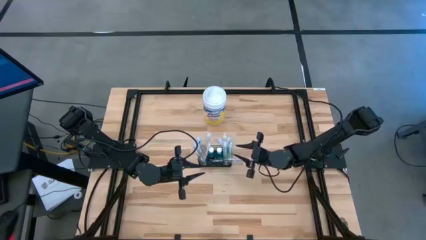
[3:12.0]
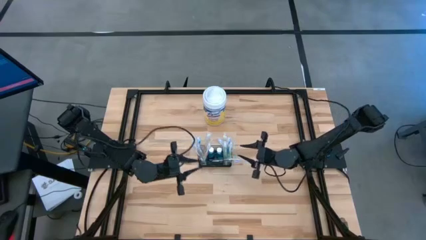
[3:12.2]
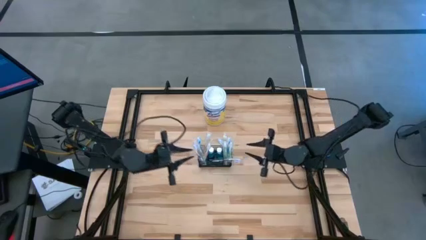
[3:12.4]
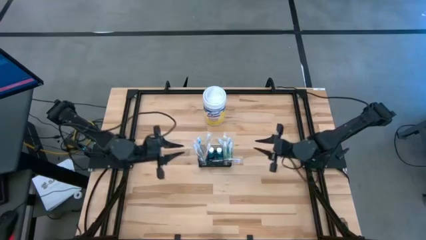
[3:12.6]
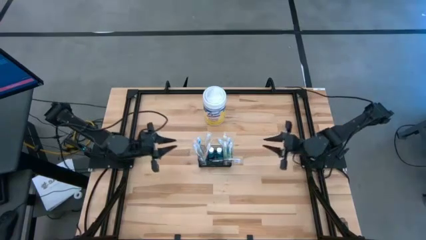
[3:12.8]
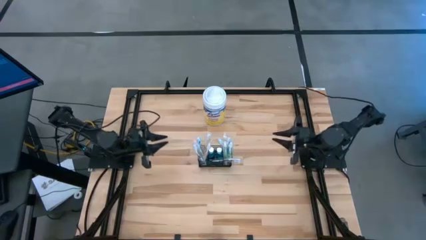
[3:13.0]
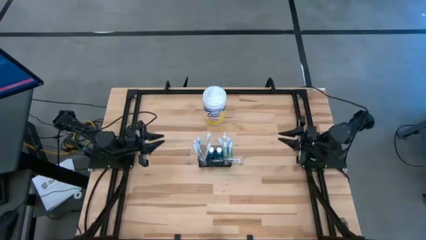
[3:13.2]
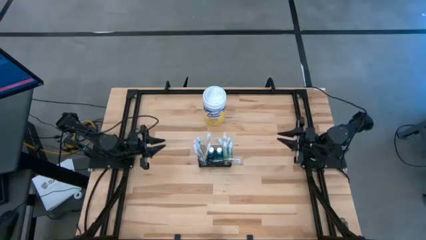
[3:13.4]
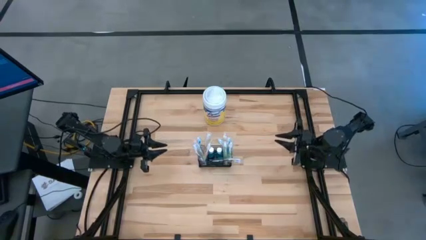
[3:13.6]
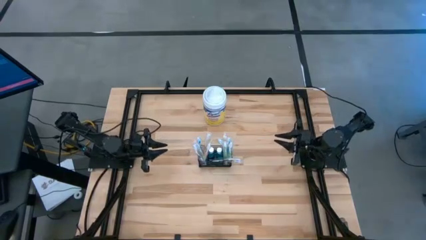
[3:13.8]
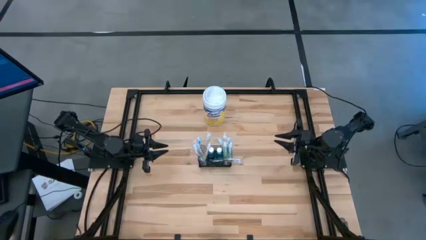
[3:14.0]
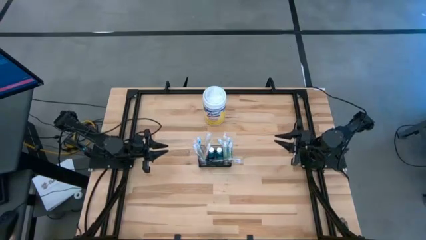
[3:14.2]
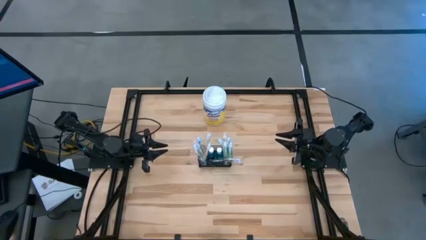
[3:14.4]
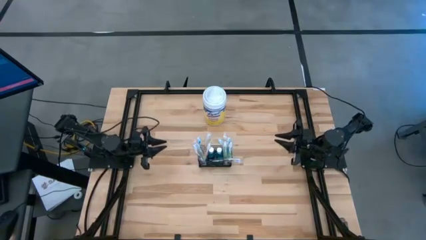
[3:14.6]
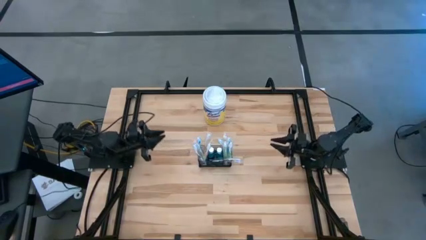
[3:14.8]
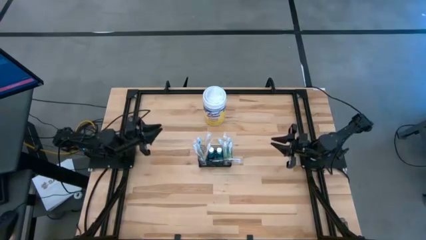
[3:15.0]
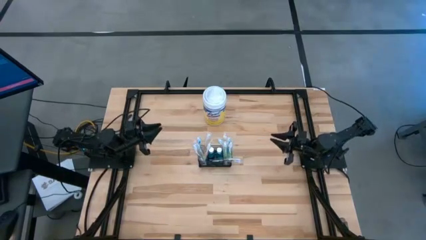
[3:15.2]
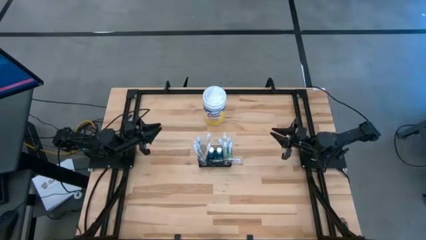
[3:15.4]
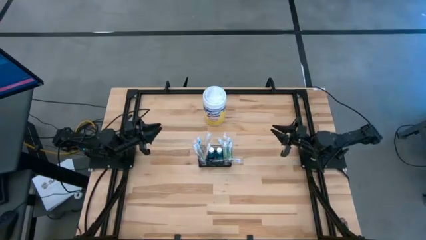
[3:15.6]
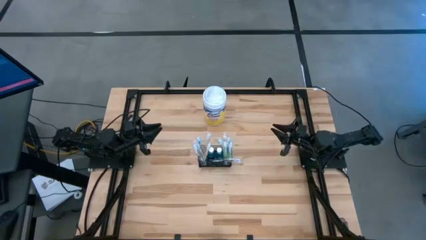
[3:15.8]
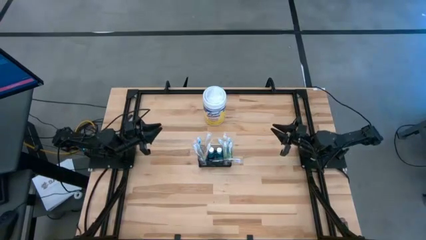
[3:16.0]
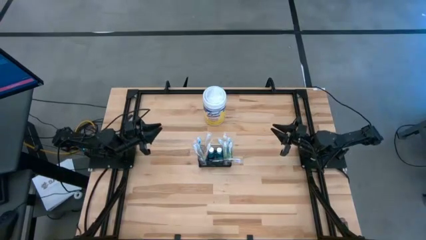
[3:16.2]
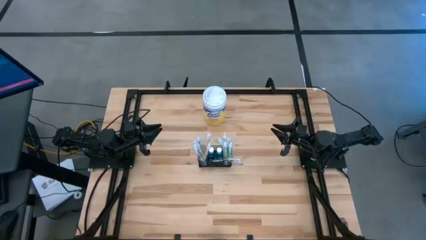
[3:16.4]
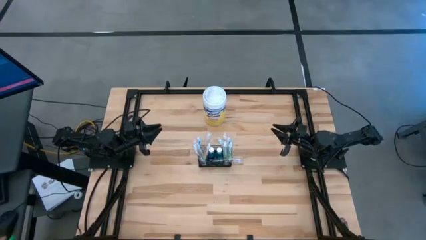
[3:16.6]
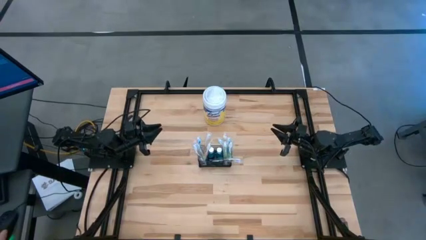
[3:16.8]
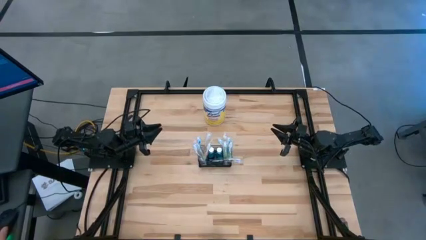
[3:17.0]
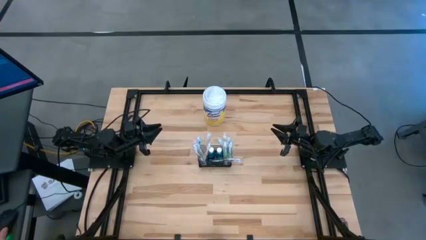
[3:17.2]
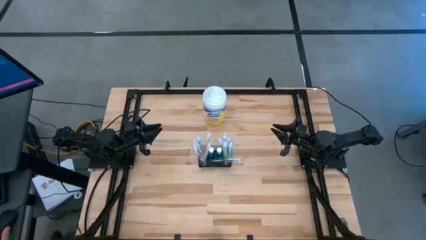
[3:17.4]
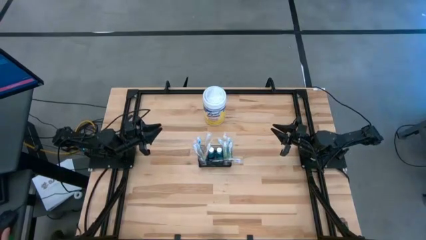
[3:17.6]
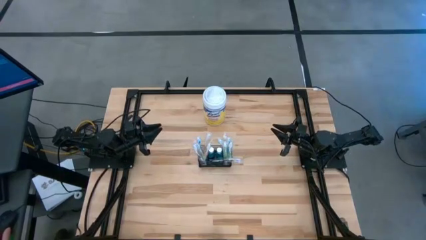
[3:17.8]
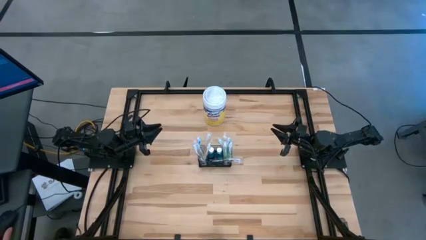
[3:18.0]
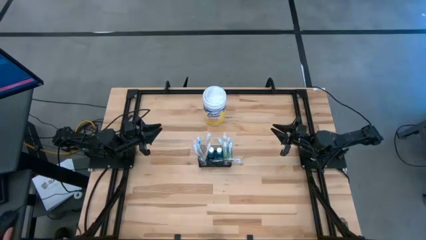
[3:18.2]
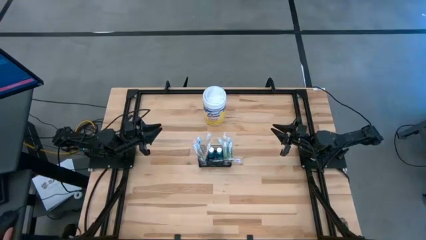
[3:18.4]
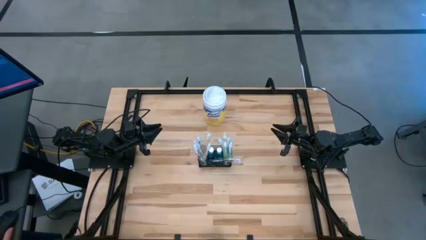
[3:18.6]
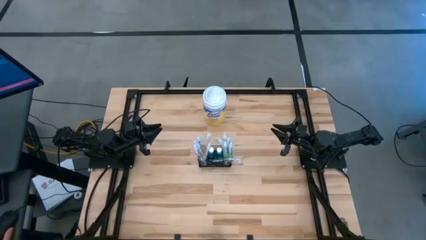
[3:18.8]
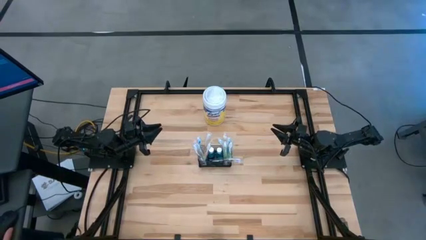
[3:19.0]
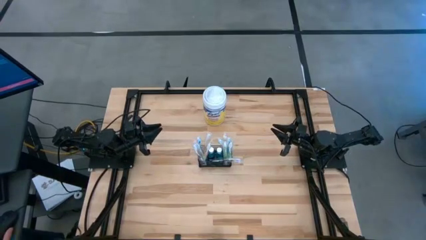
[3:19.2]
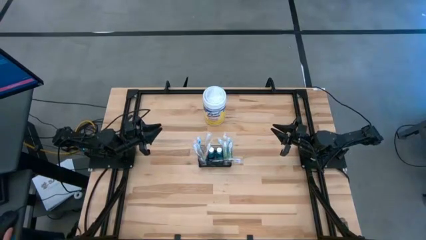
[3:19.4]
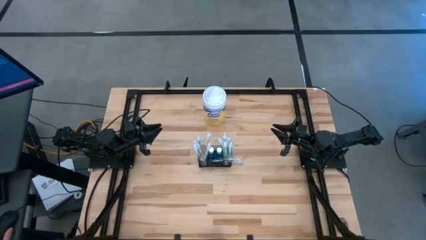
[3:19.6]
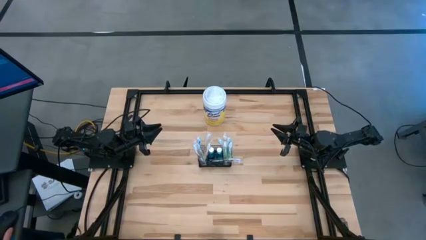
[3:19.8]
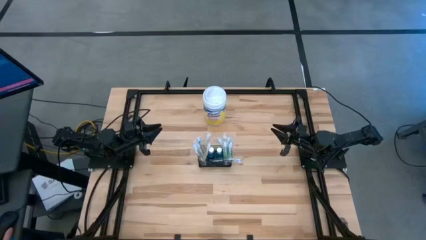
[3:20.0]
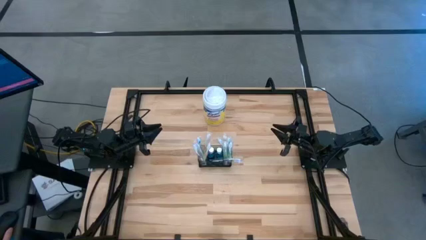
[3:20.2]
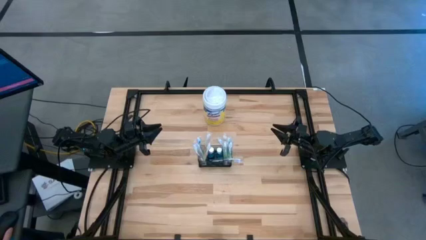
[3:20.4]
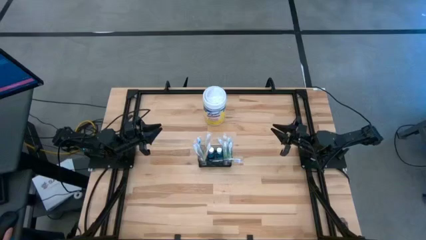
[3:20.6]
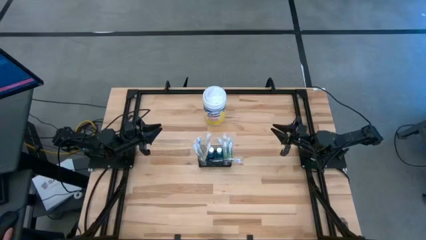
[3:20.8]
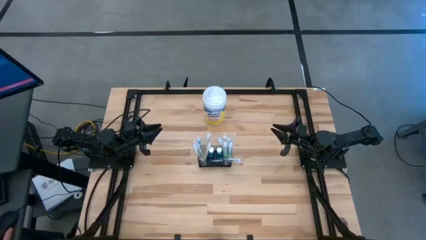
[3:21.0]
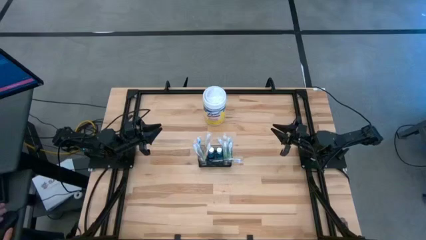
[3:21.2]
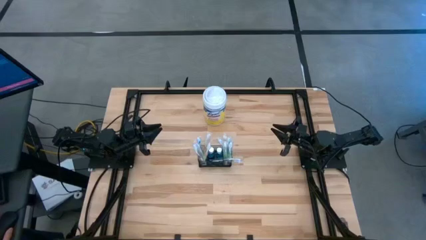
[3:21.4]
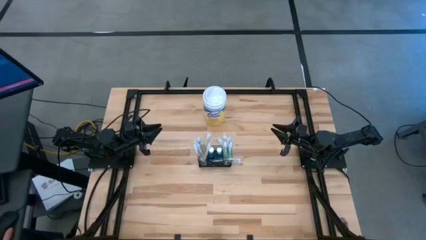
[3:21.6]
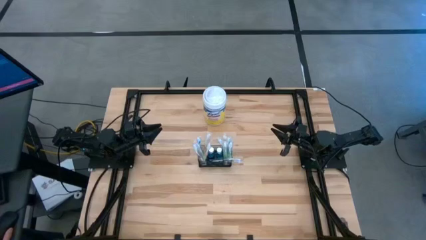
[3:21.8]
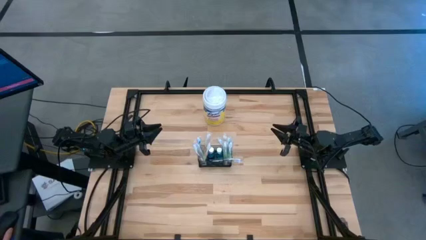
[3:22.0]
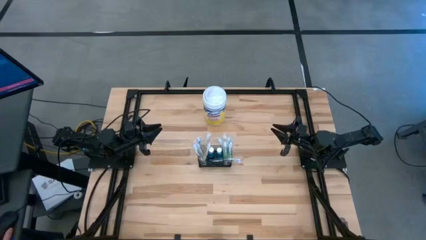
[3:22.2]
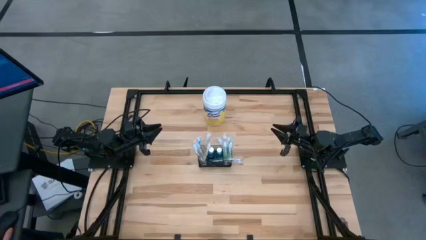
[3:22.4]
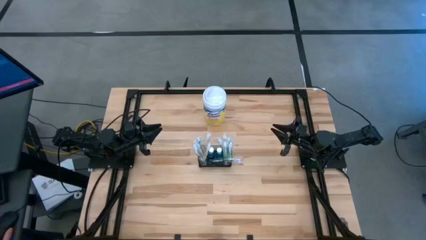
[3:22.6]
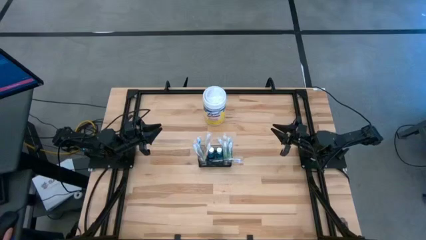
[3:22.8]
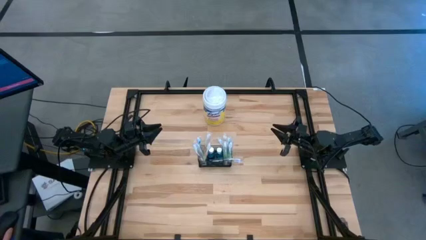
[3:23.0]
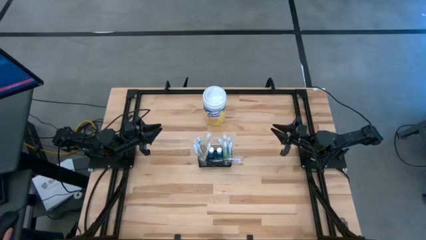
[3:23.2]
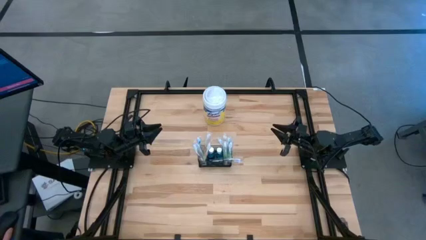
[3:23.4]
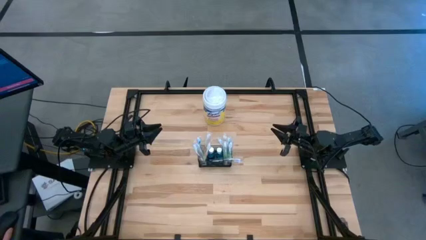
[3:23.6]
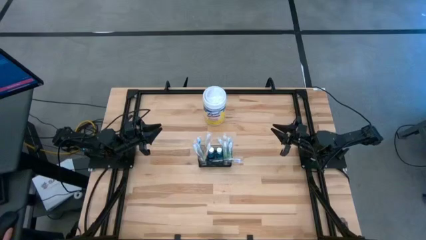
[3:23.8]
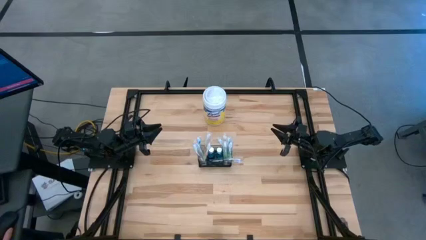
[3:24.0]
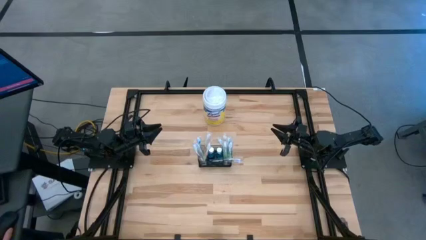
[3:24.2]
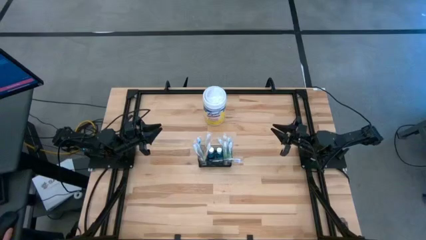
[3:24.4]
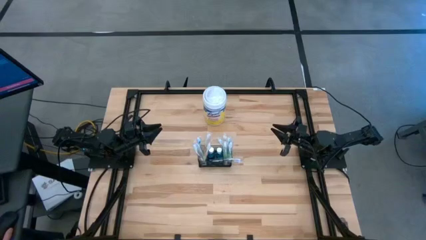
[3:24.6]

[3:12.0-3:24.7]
Task: Pick & Place toothbrushing station
Return to Home Position

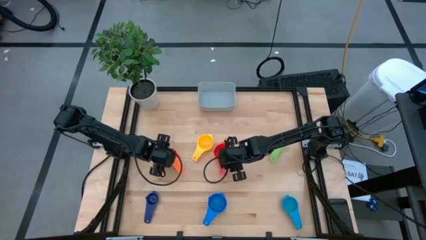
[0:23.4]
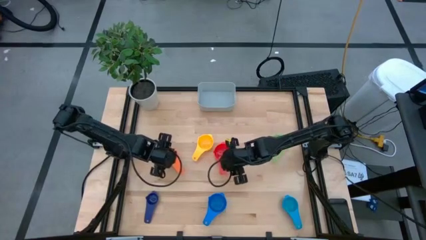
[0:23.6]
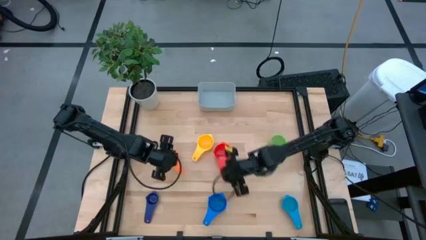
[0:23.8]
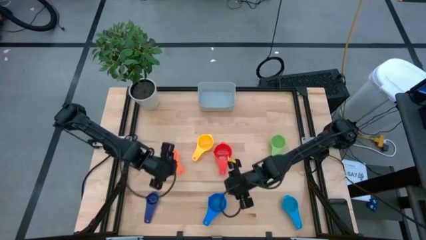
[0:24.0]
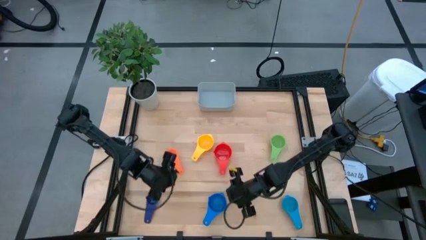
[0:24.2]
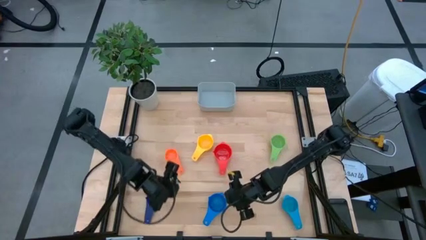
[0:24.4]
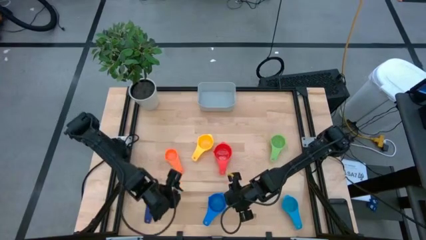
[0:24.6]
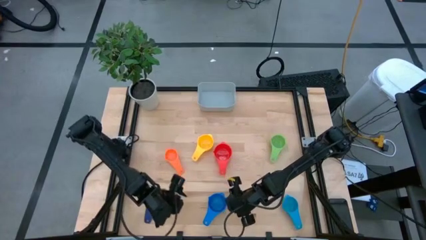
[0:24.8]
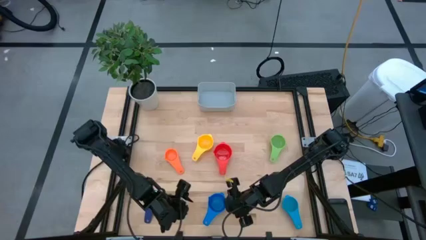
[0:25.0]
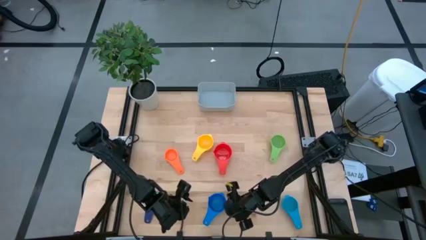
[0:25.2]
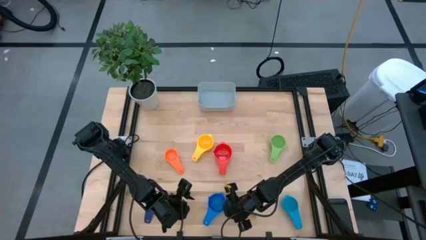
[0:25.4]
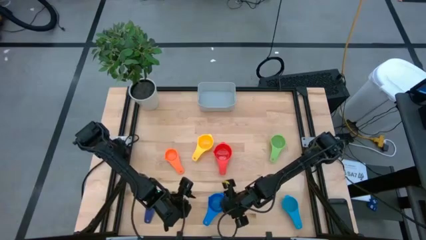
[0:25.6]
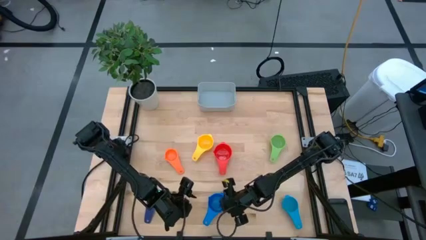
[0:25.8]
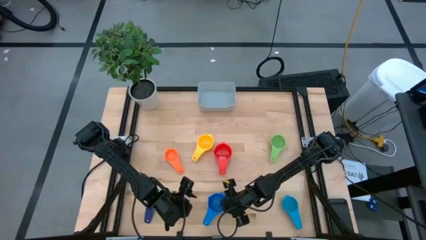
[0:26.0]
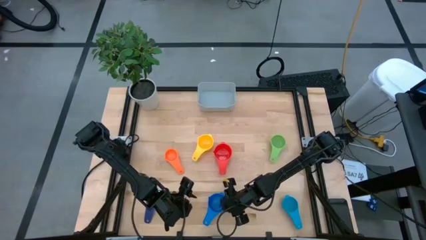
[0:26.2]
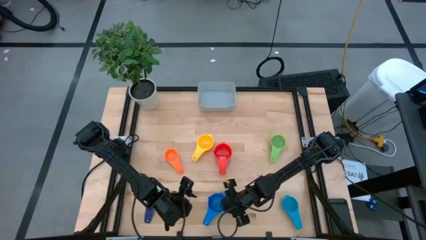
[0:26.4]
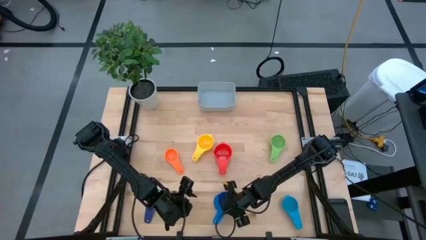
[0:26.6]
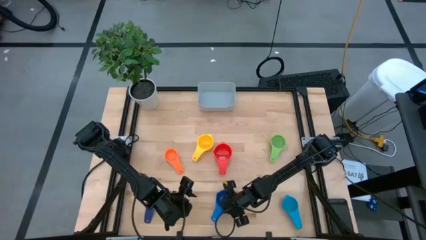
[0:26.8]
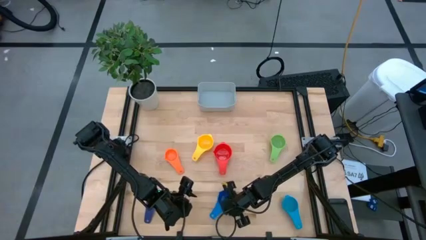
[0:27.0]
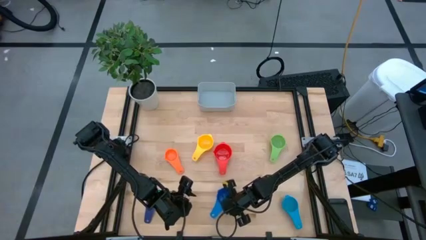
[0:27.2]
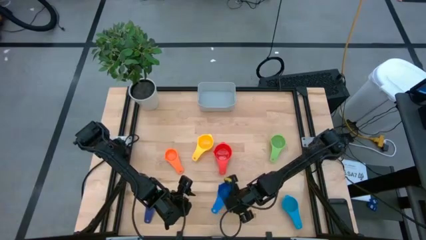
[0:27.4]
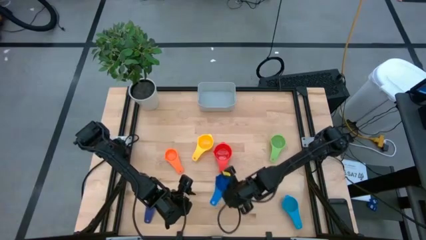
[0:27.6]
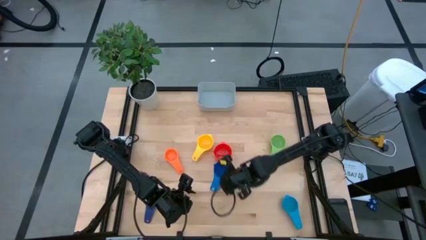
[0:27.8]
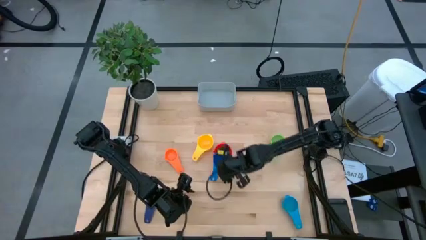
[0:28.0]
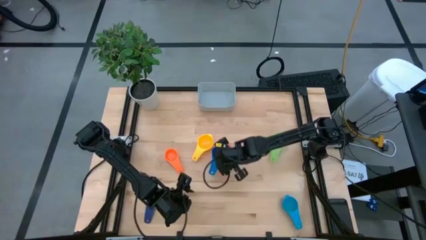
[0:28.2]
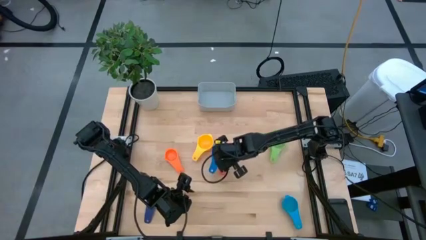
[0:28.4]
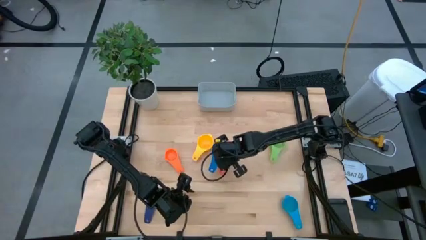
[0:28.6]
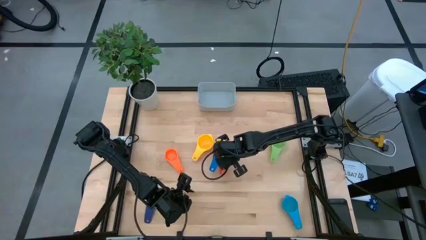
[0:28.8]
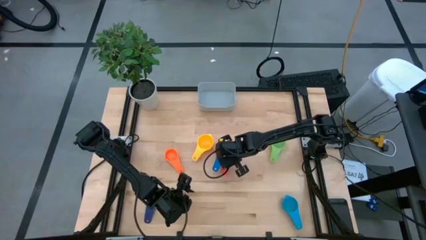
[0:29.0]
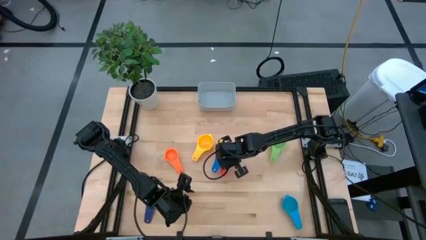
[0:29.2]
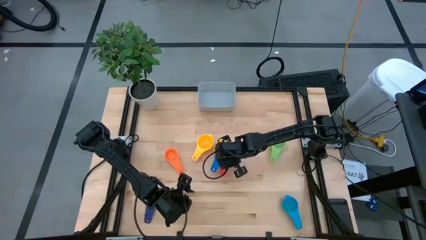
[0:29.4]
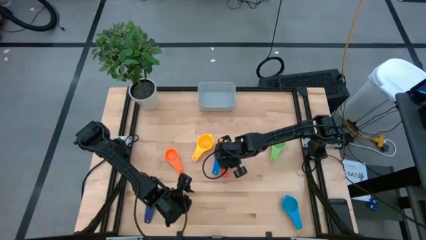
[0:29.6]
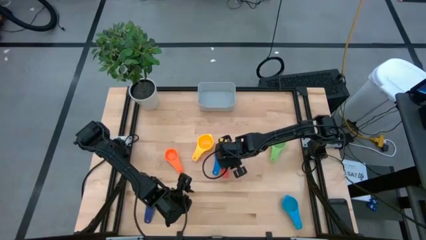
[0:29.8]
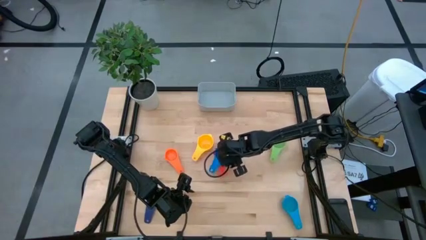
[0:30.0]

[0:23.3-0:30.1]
Task: Nest measuring cups in basket
Stack the blue measuring cup on top of the red measuring cup
